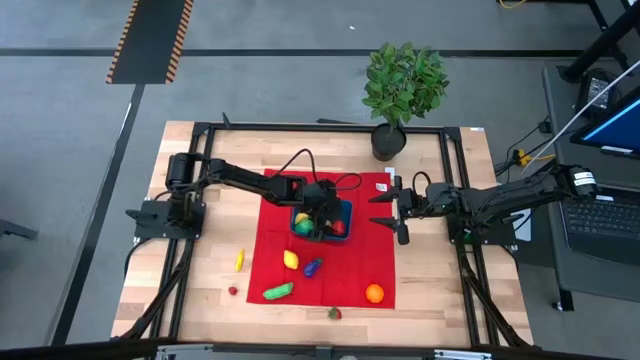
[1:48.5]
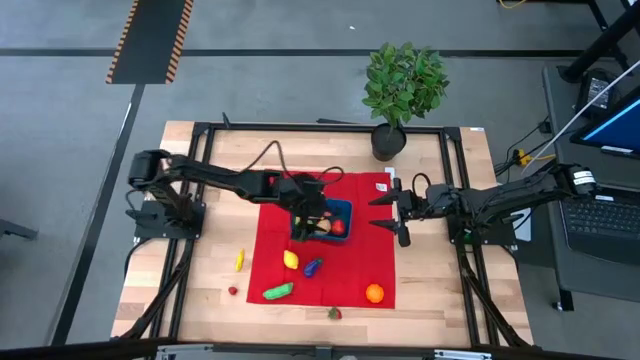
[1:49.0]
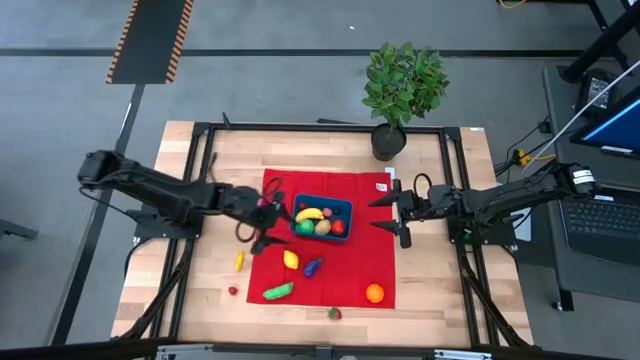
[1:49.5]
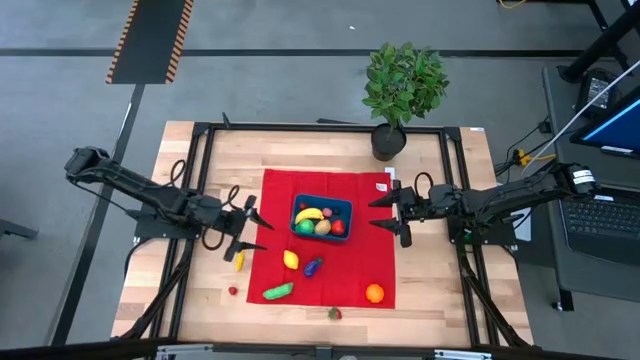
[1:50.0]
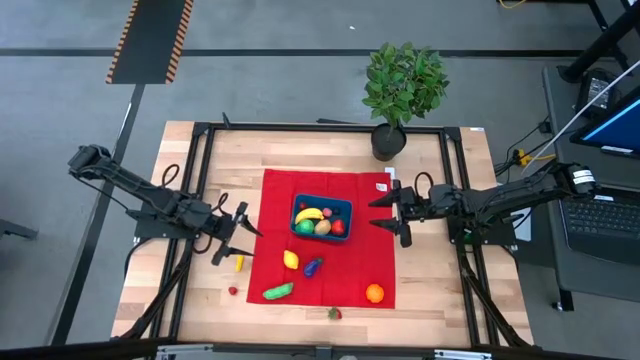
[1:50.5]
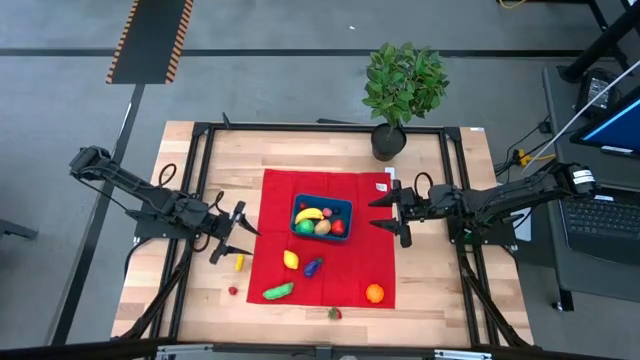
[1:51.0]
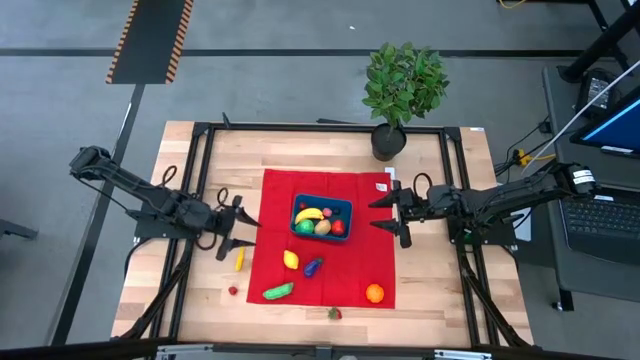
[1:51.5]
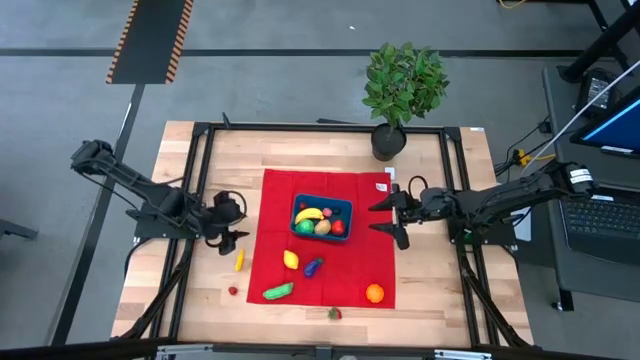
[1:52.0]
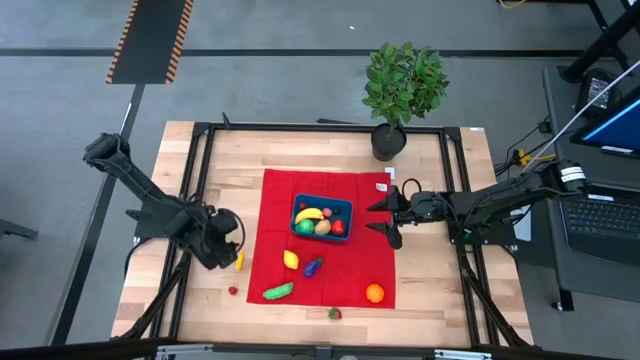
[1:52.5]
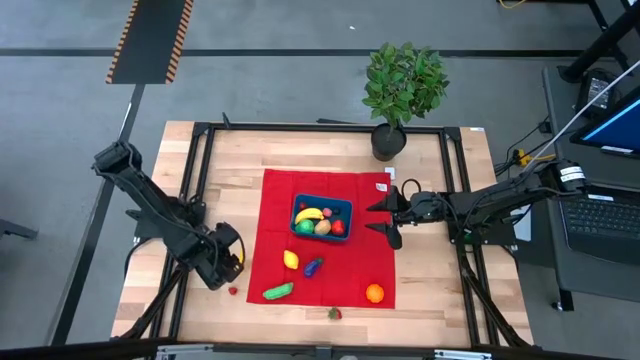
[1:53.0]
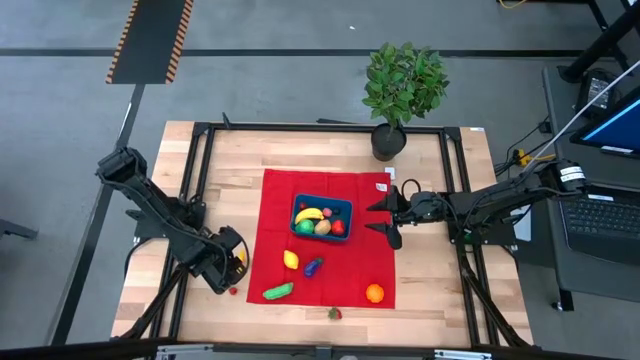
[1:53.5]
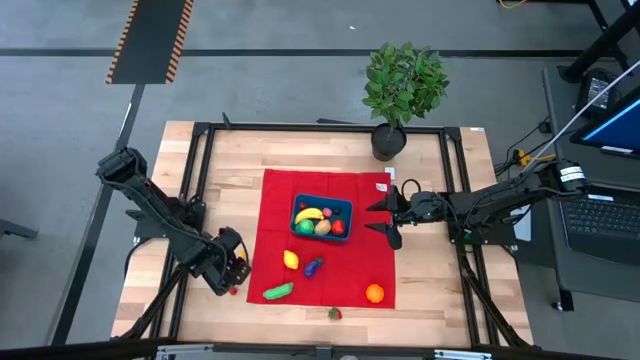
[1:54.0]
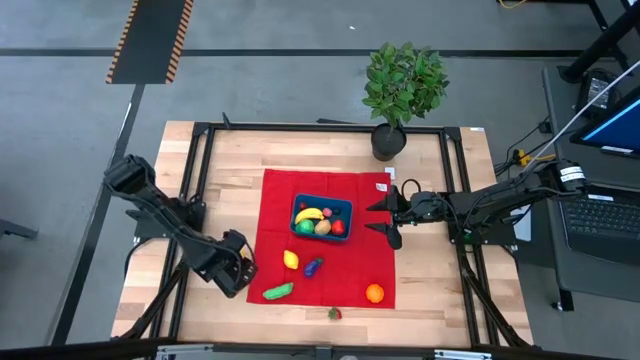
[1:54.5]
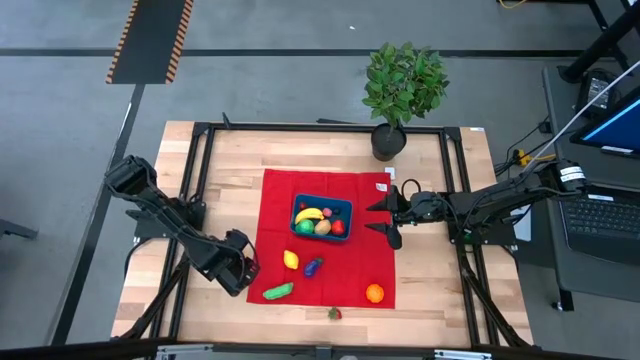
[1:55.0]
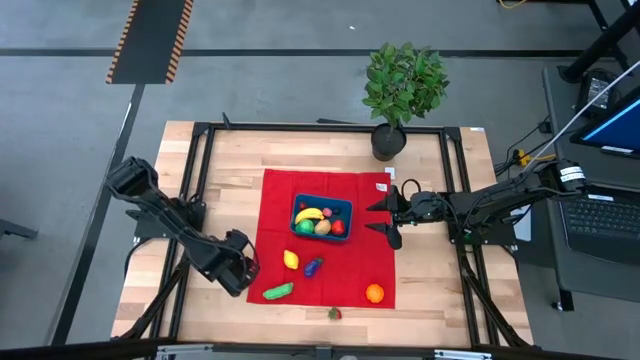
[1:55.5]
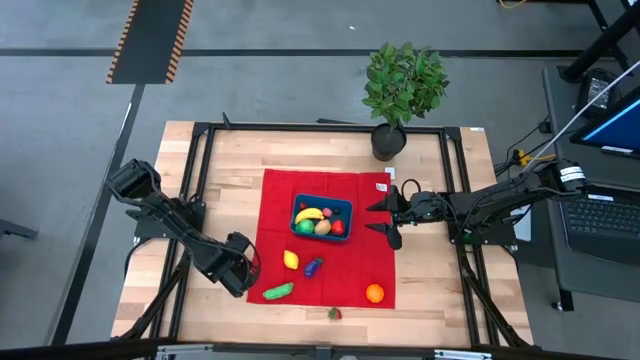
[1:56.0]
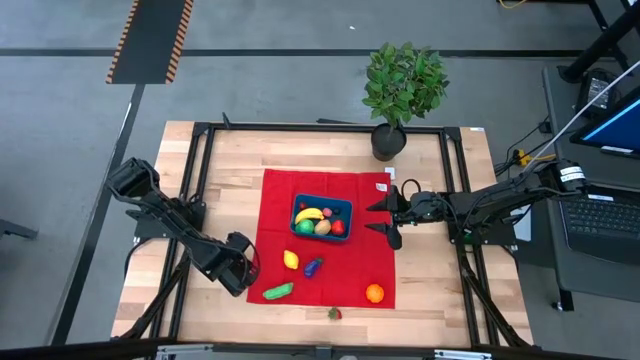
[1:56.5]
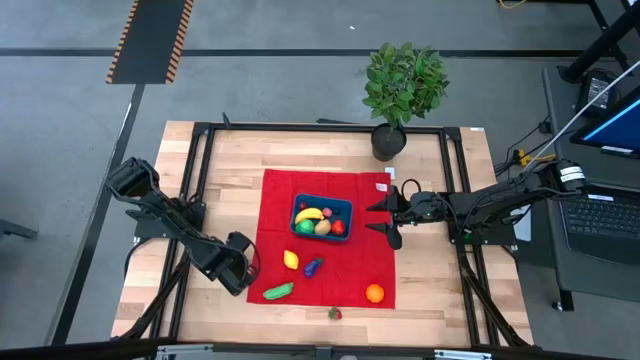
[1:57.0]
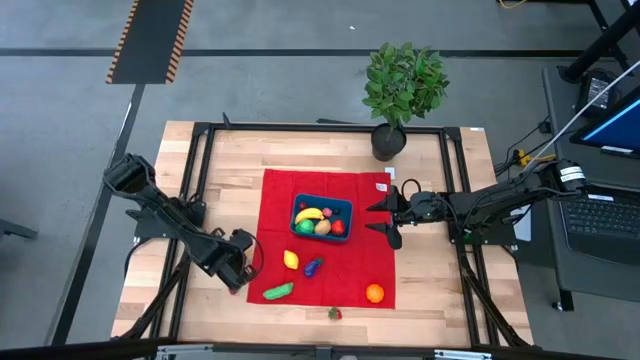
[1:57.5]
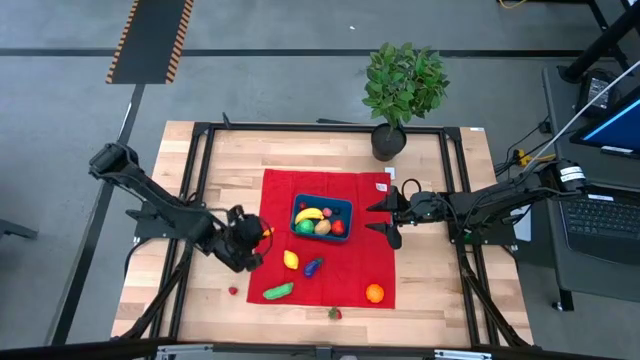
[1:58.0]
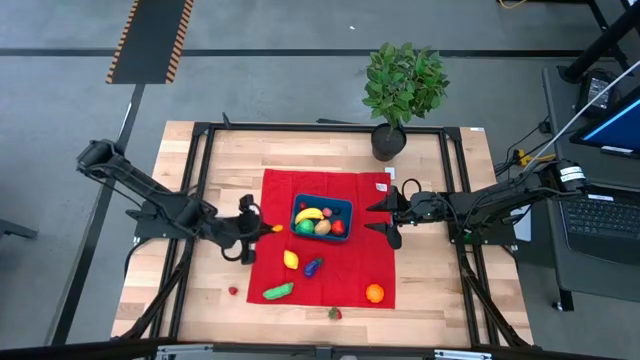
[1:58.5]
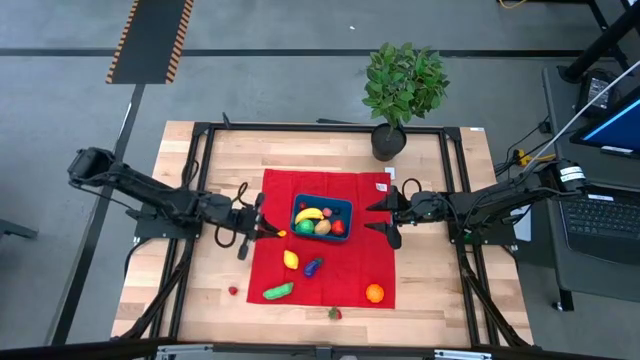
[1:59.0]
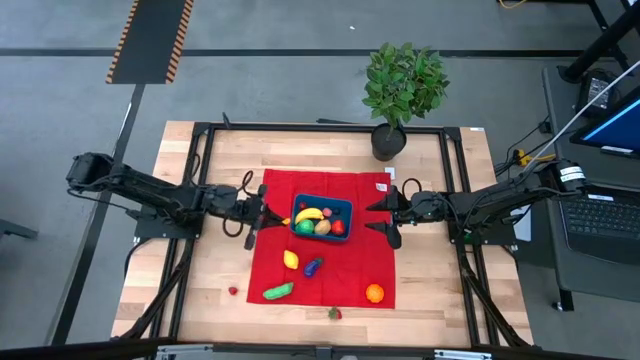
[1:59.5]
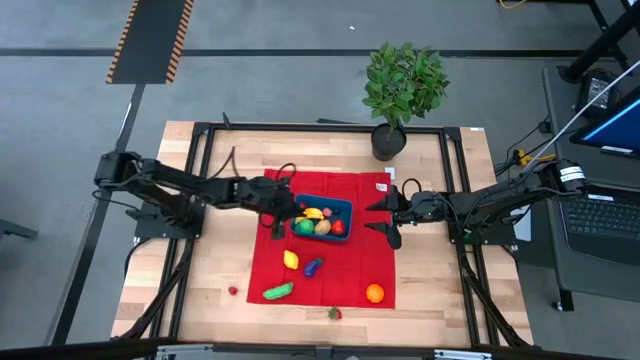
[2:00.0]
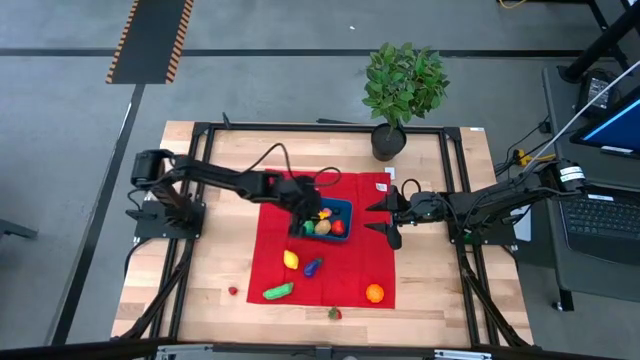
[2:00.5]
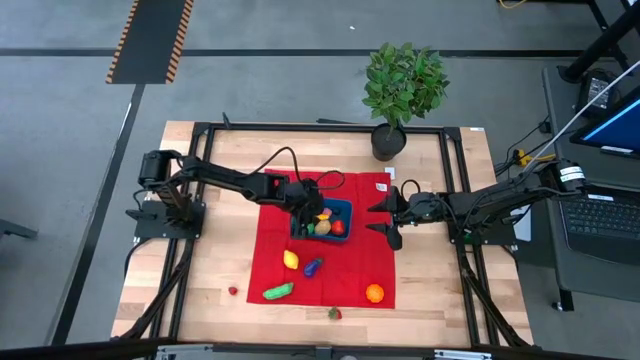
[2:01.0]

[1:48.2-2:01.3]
Task: Pick and placing Produce into tupperware
Put the yellow corn into the blue bin

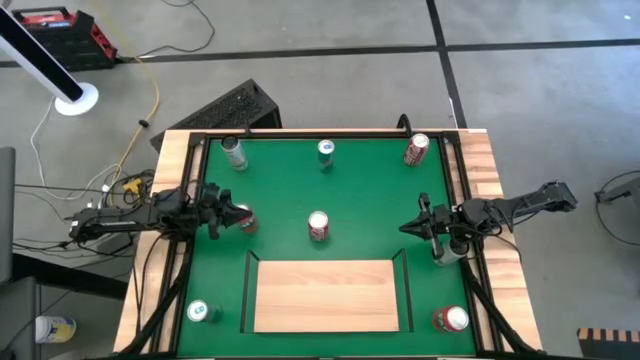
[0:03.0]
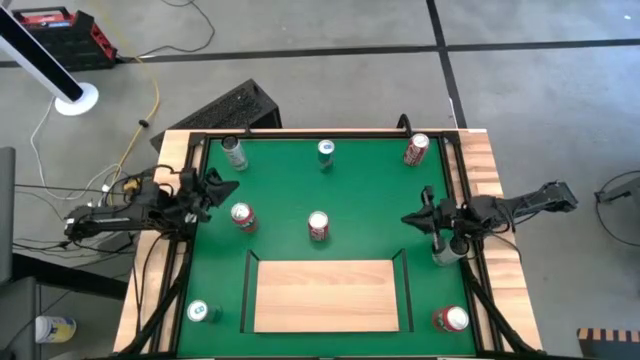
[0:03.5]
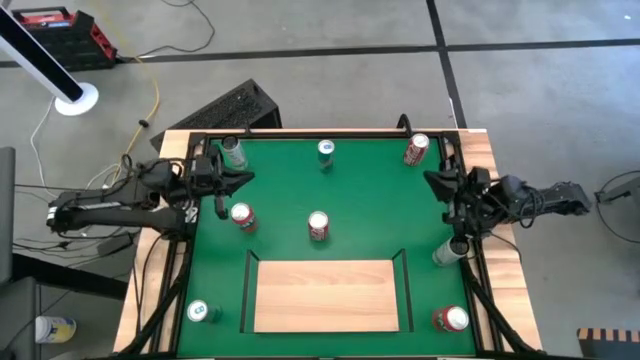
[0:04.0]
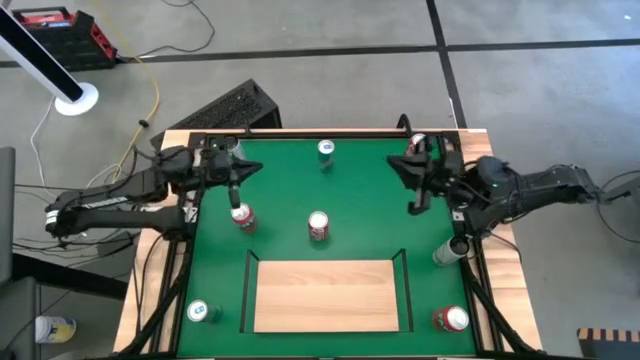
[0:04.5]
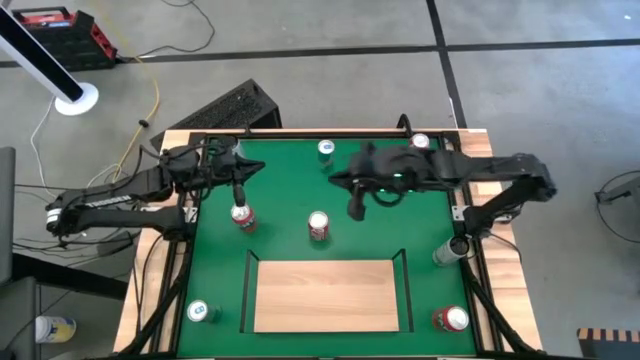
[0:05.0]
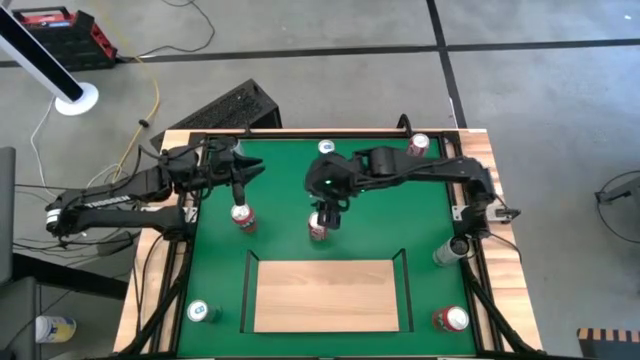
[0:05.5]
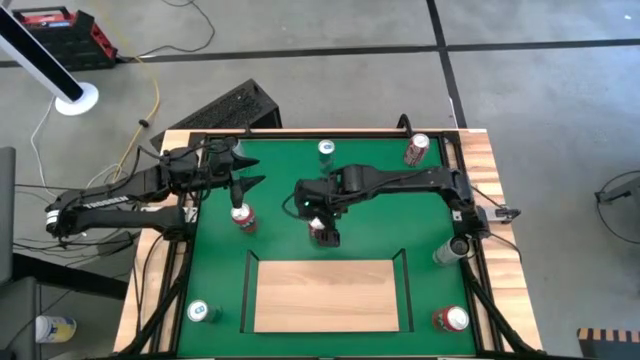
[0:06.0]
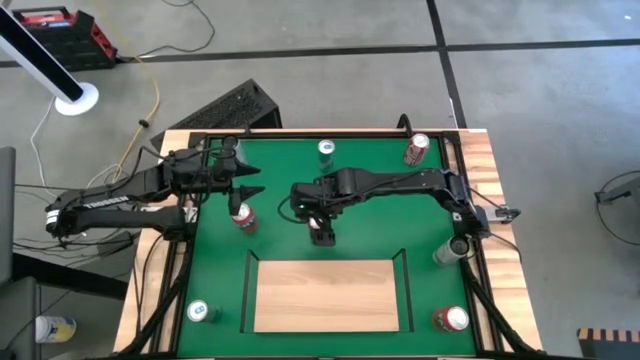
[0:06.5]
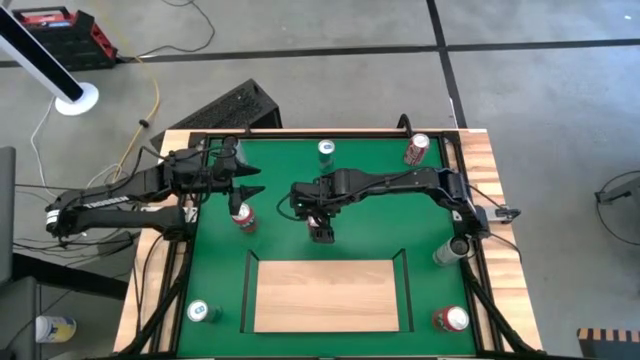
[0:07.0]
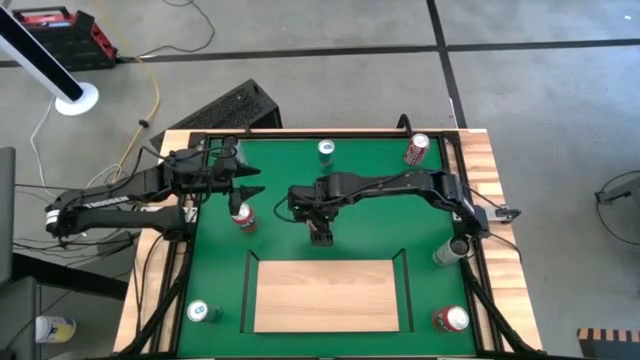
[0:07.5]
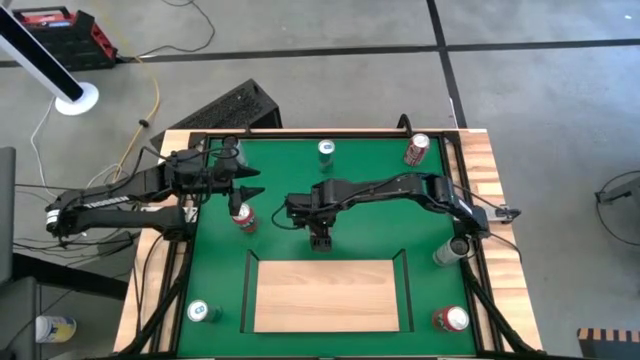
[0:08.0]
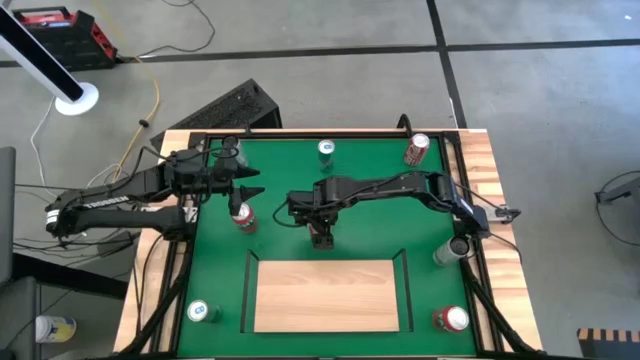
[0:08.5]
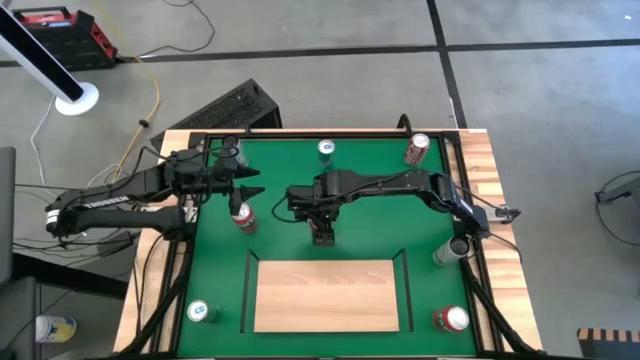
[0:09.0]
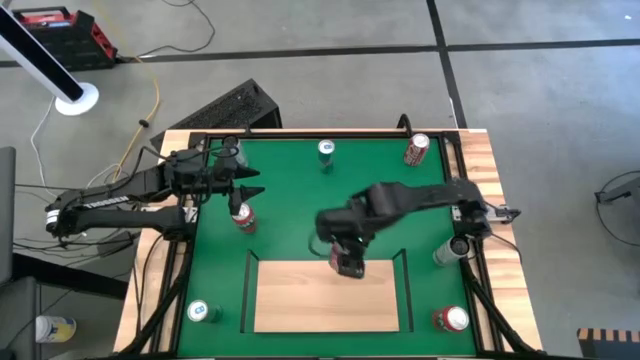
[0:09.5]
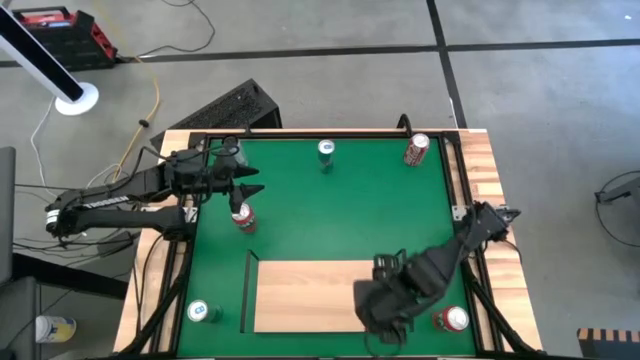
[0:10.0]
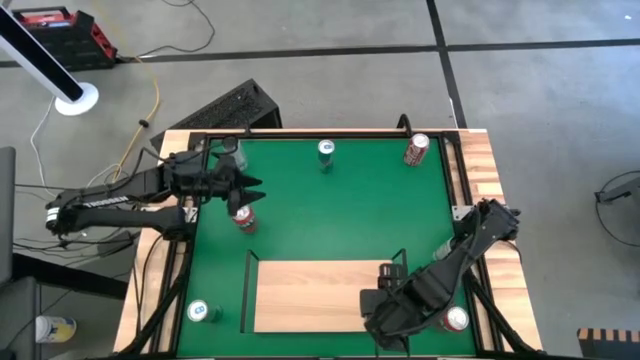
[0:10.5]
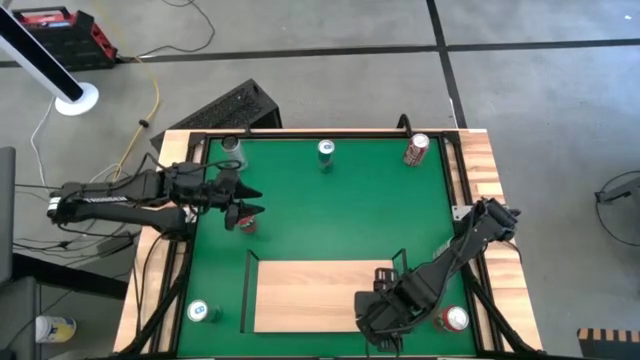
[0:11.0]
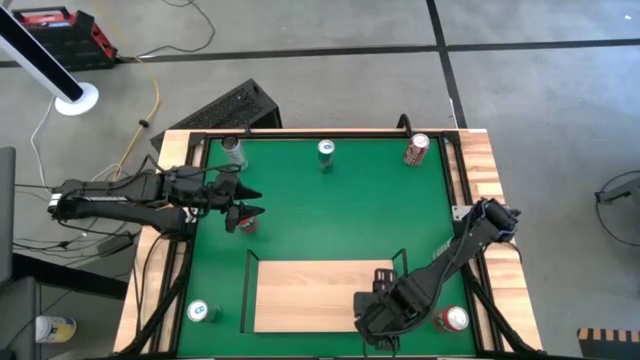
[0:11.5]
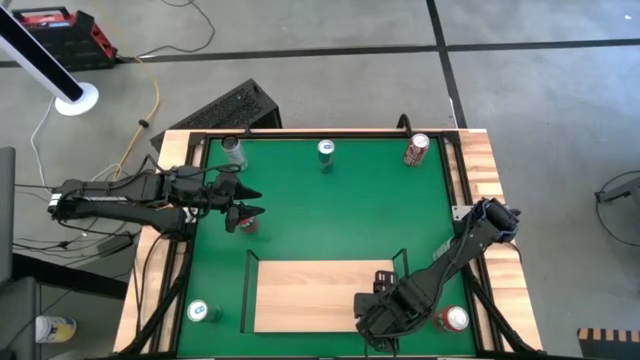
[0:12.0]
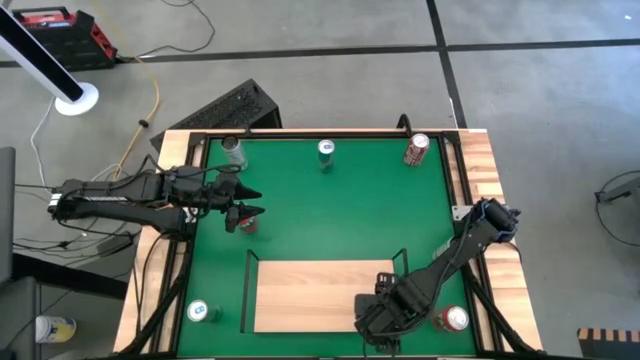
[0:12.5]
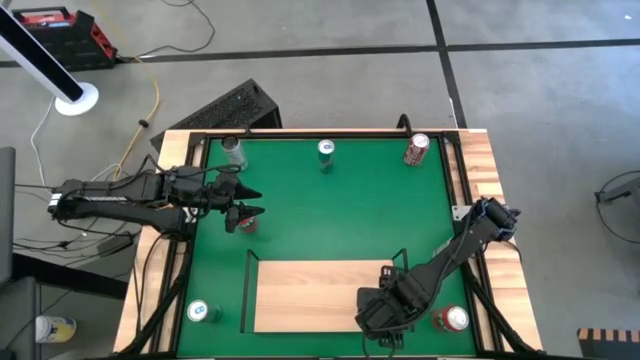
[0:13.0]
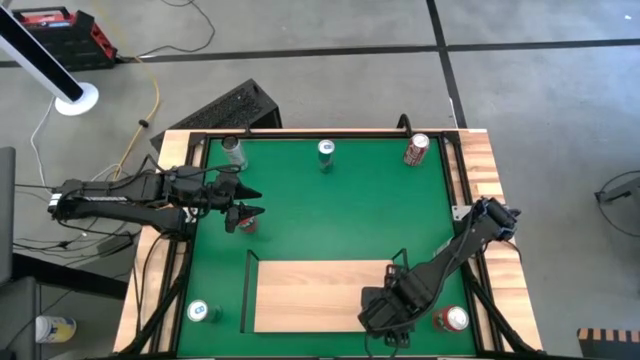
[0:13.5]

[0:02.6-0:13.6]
Task: Place canned beverage on shelf
Put the bottom red soda can on the shelf
